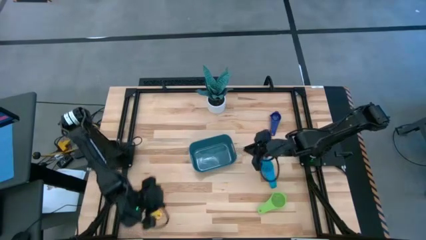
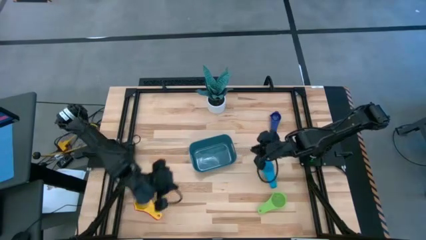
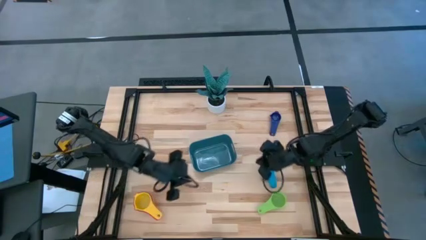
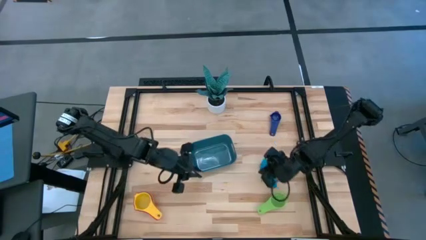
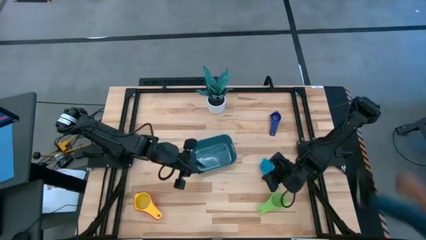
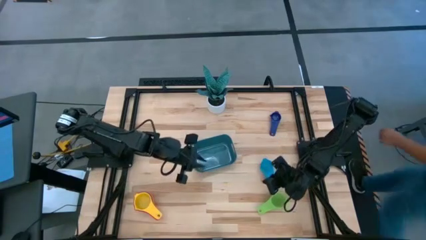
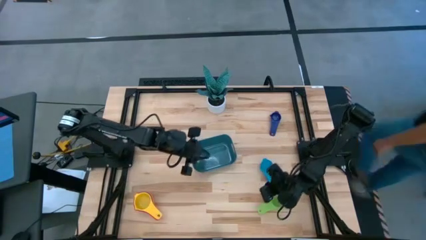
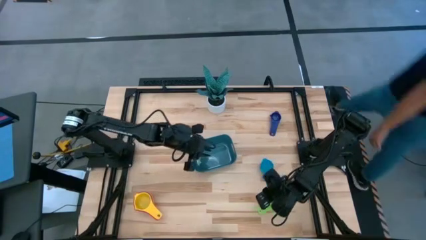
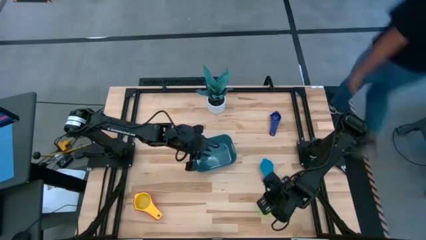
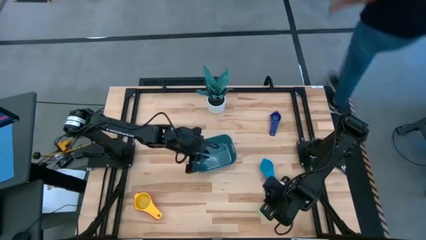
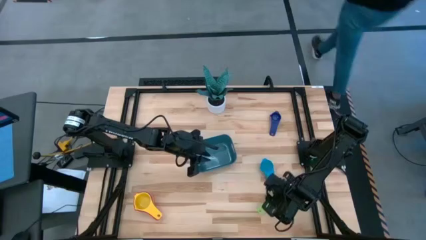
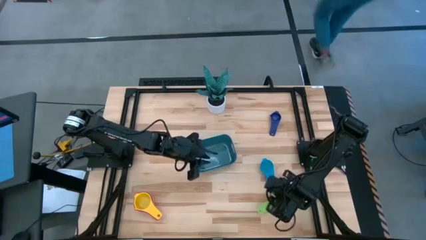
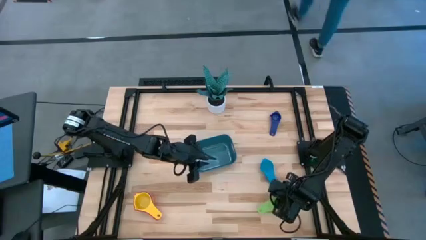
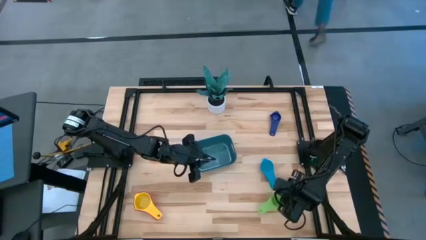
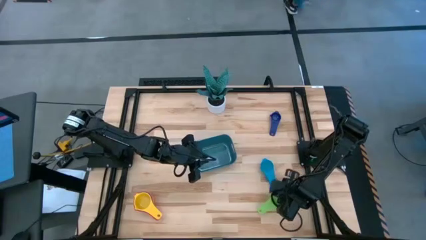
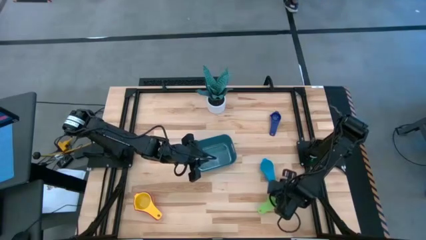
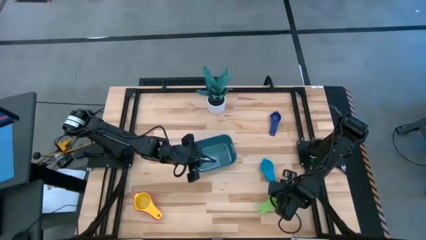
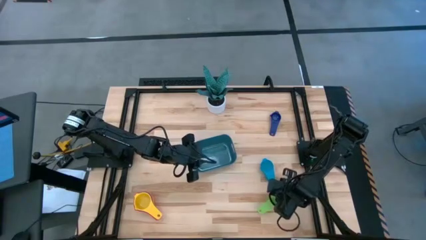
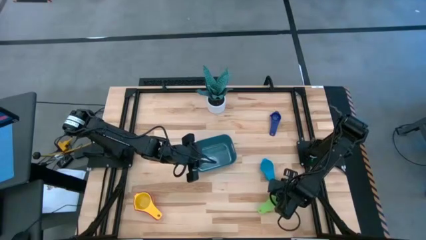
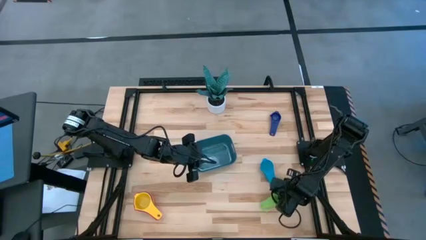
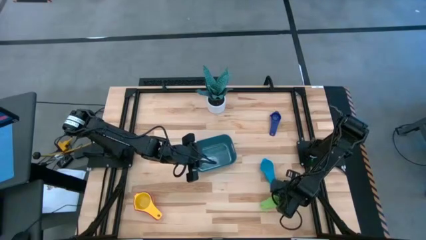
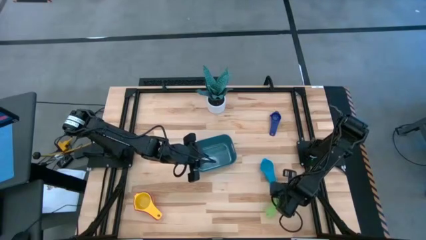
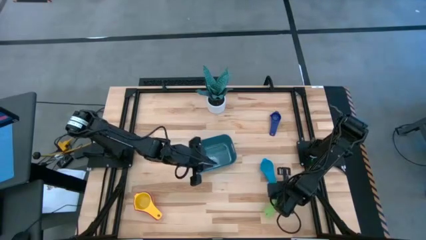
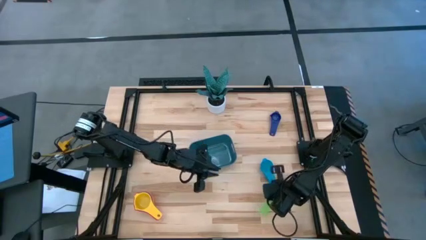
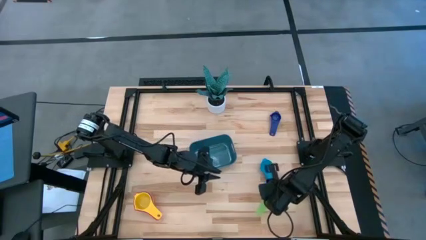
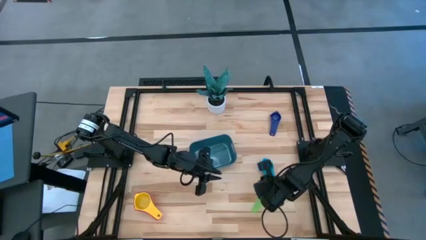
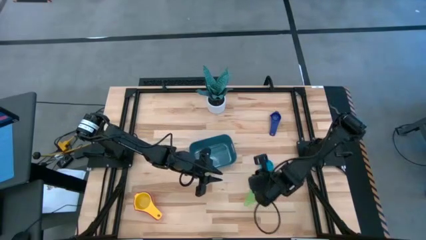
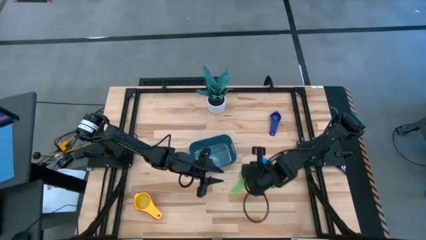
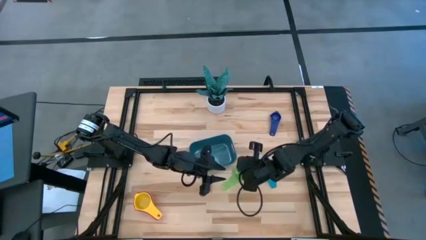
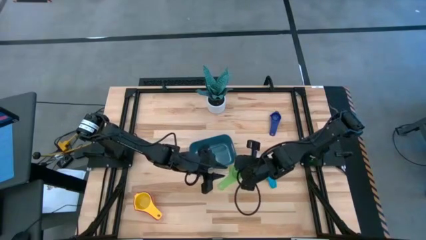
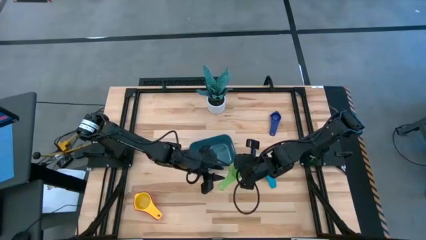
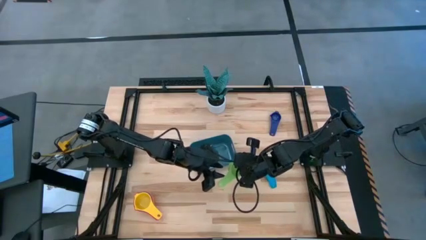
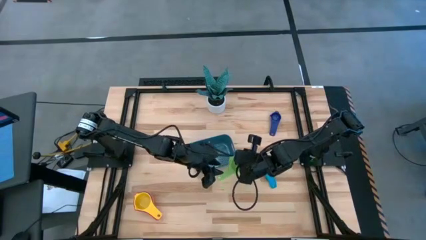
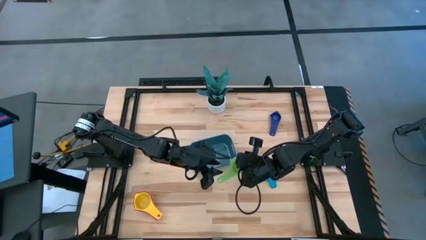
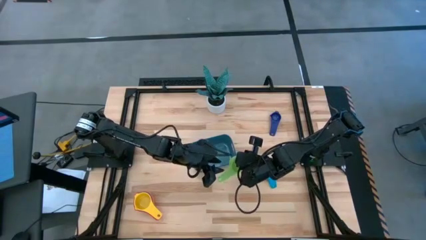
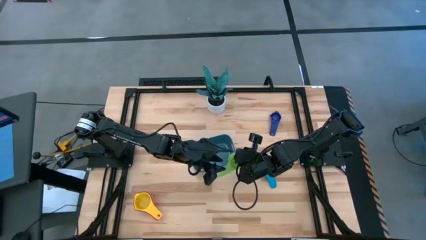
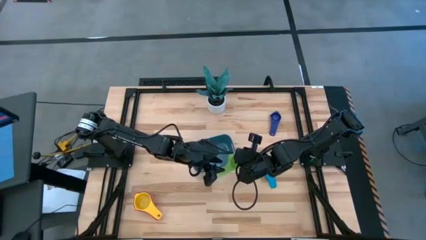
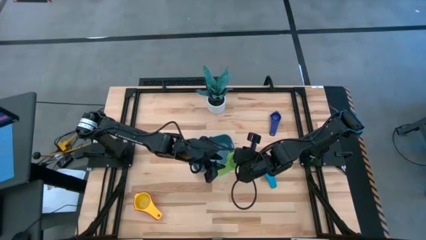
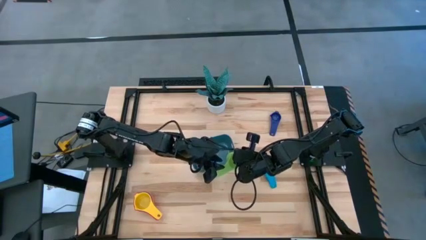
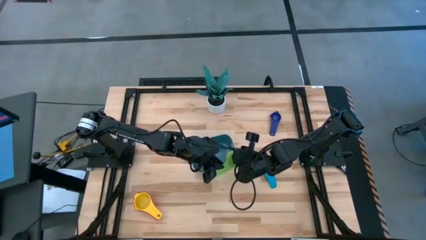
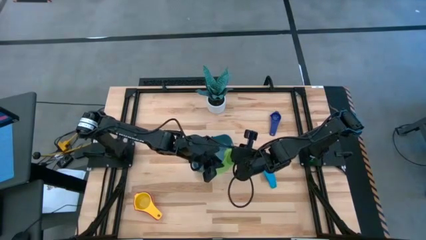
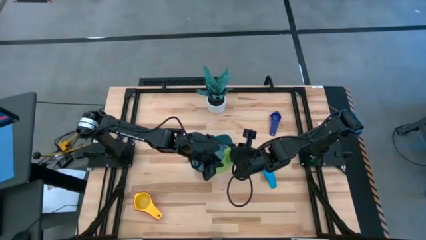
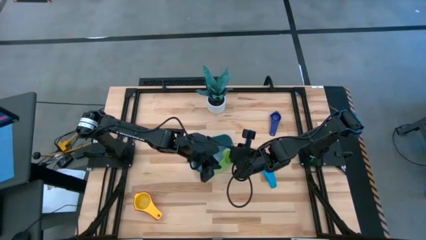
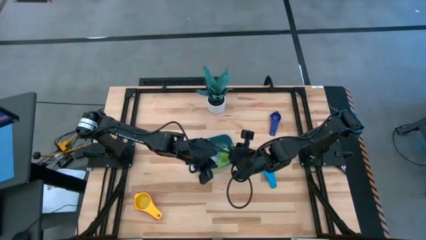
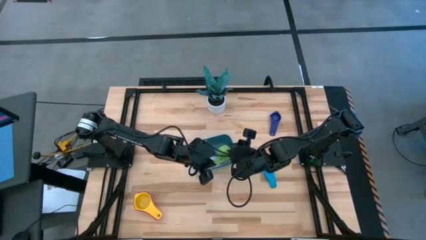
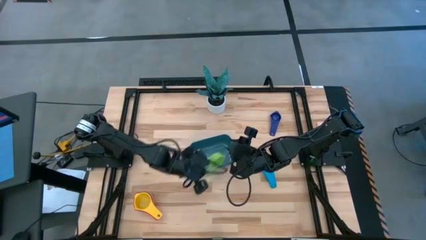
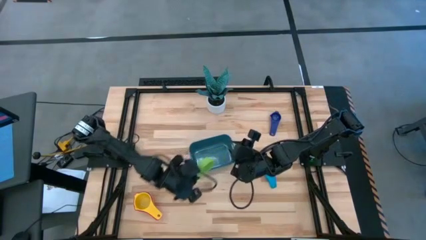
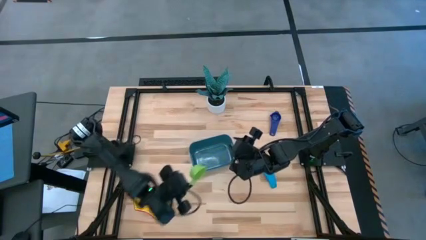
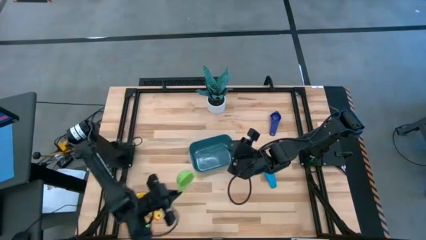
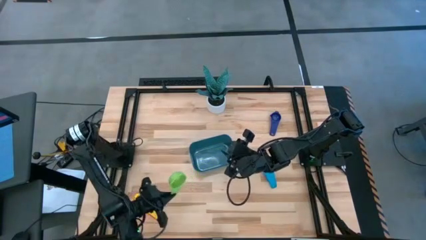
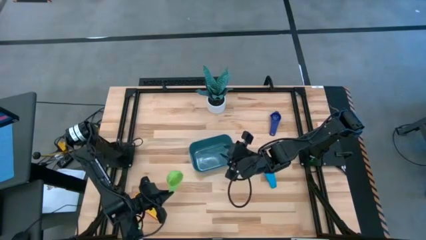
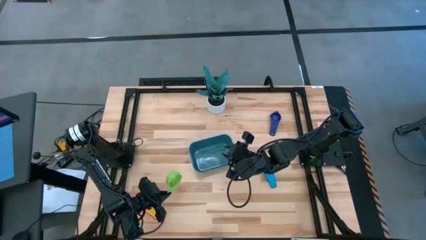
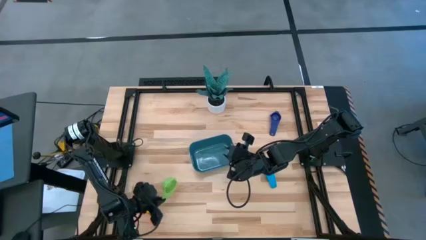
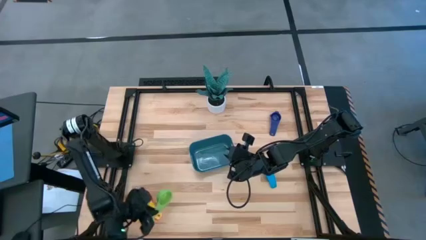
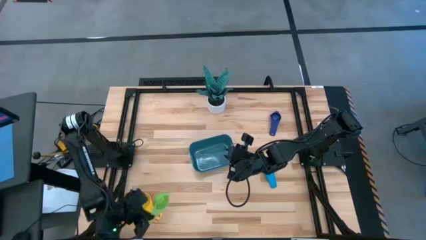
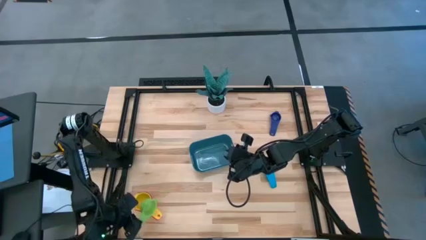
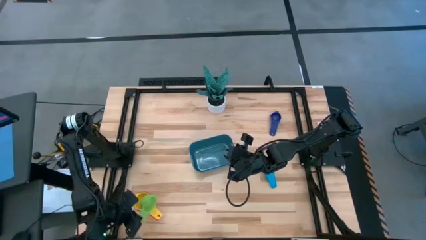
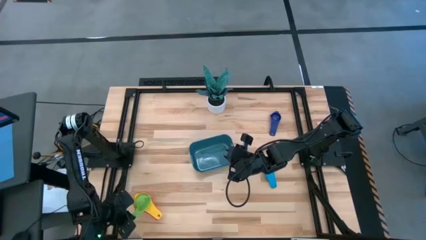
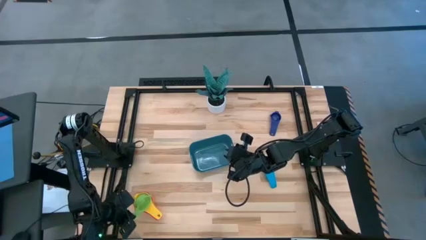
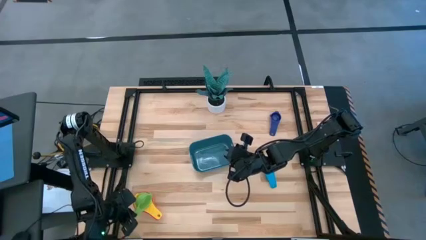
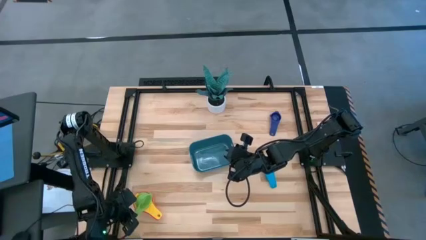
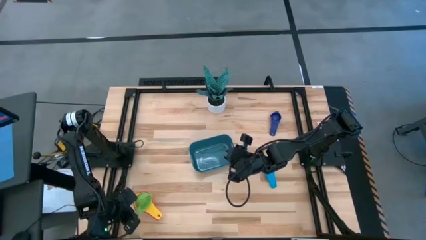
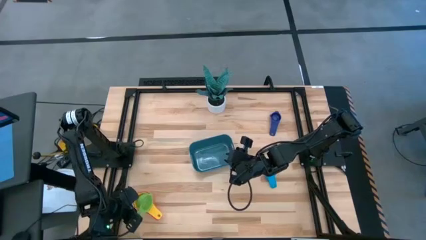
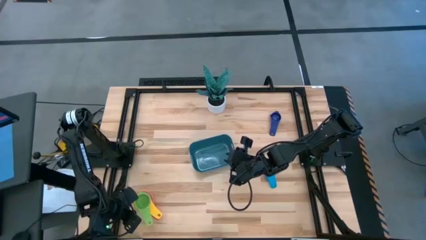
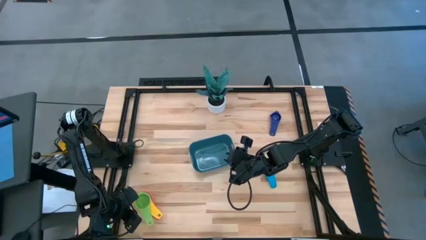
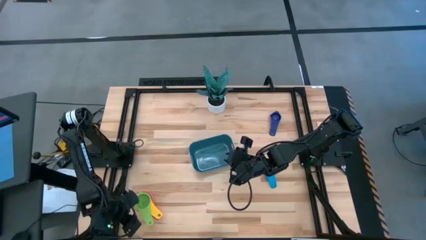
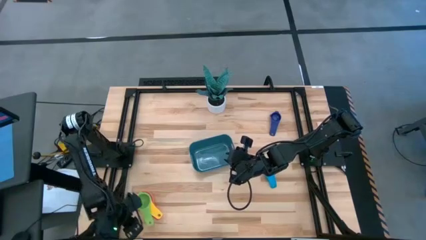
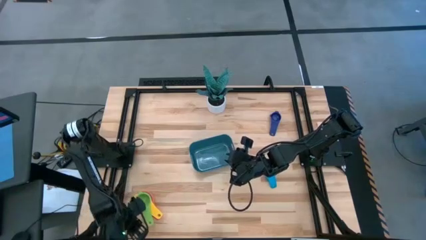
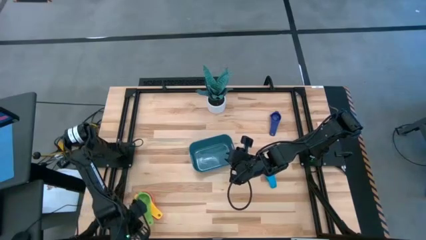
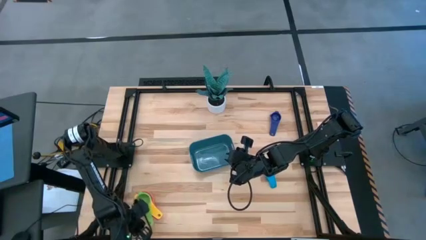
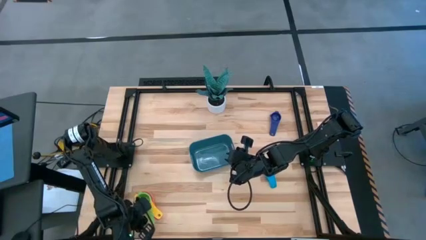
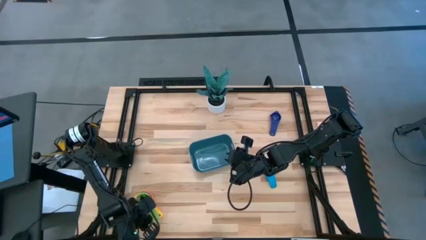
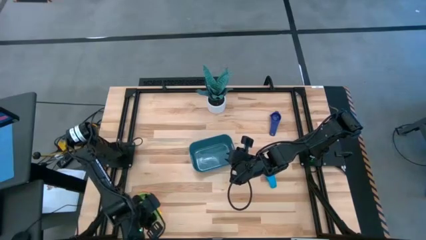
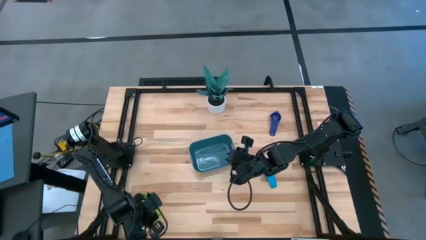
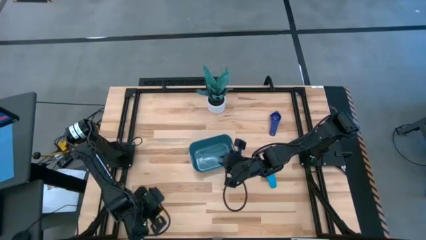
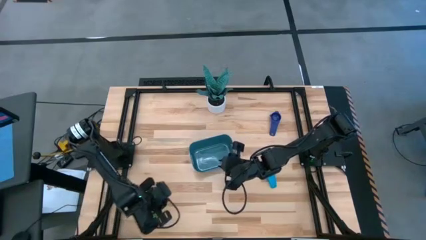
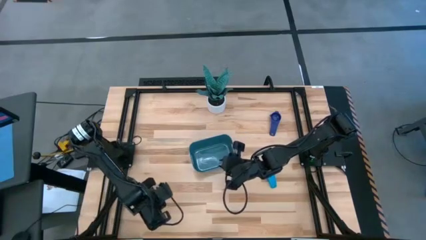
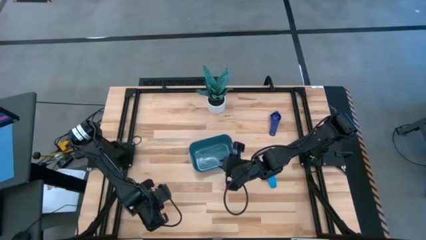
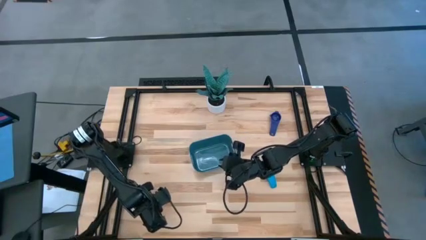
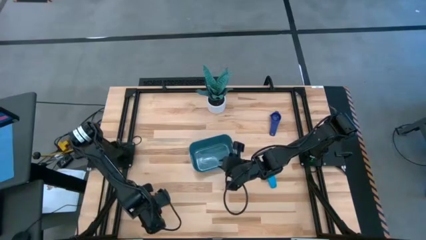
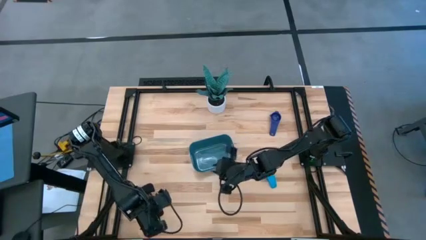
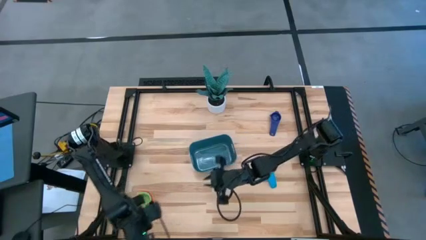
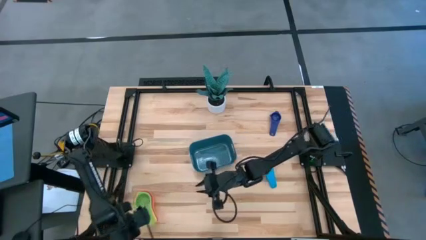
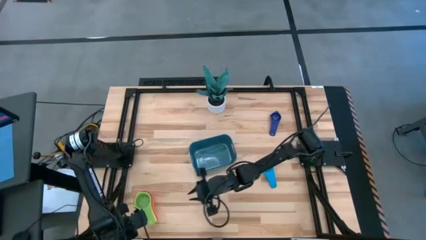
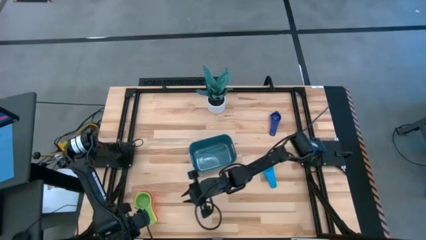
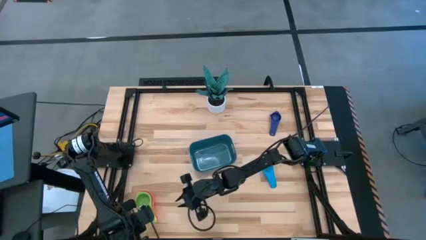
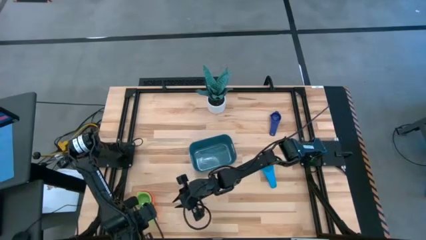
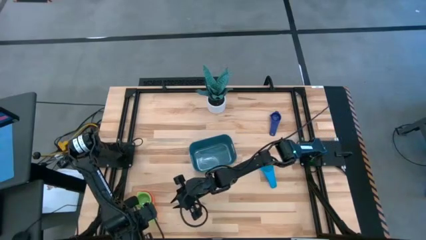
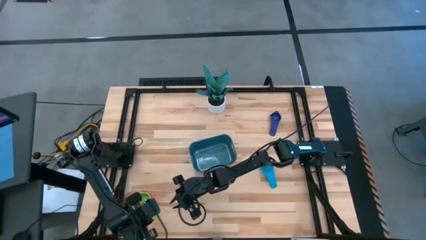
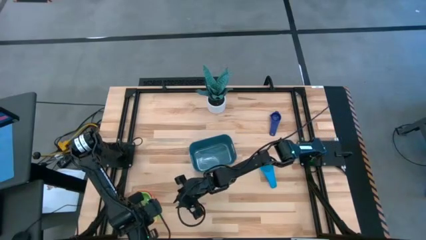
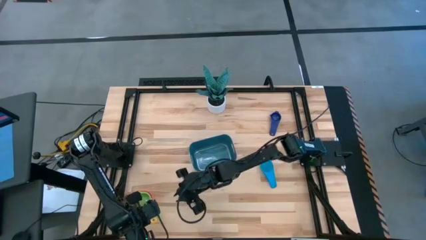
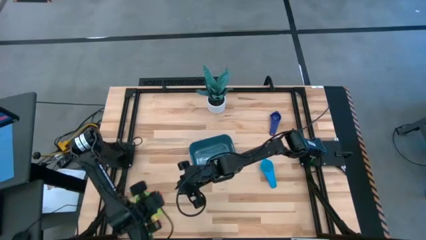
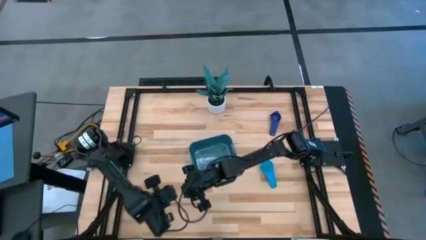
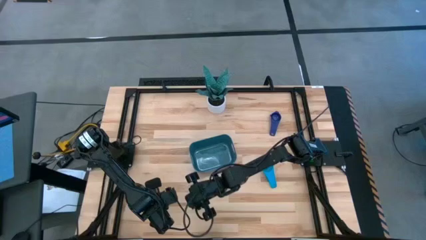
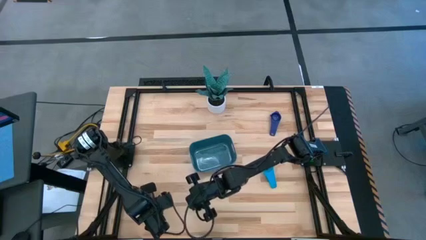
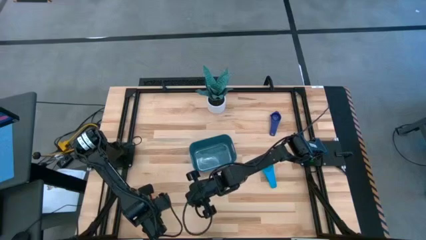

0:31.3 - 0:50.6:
Task: Nest measuring cups in basket
Stack the green measuring cup on top of the yellow measuring cup
